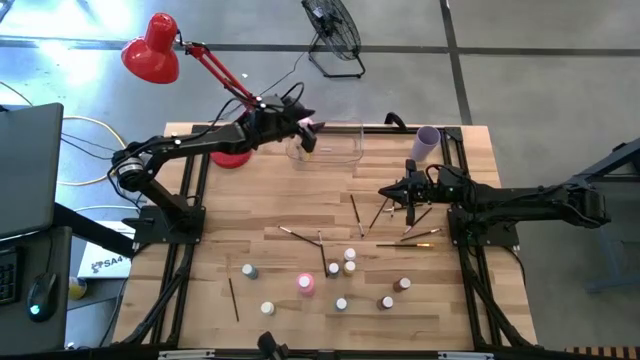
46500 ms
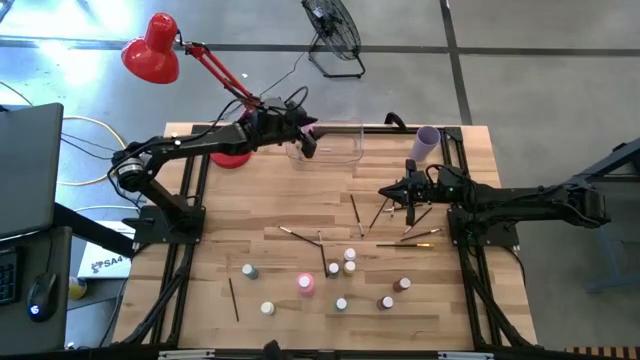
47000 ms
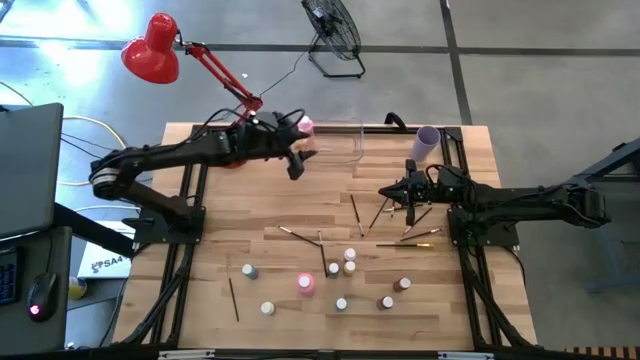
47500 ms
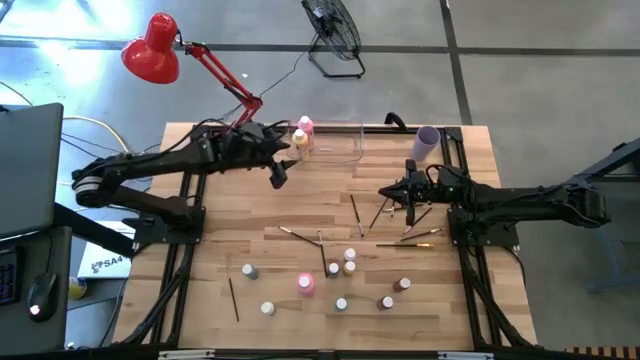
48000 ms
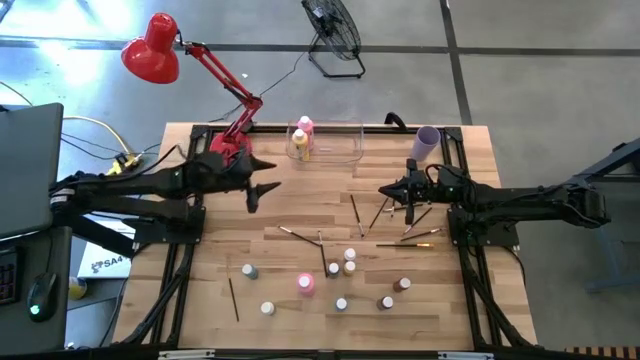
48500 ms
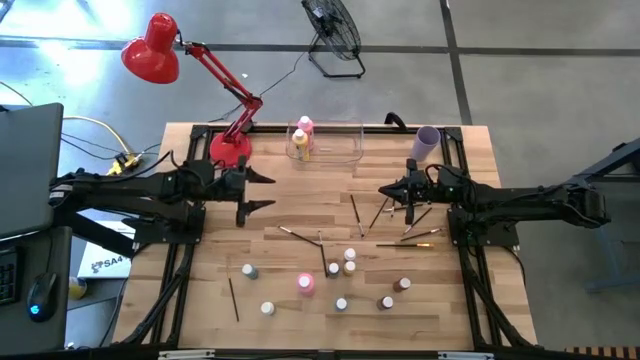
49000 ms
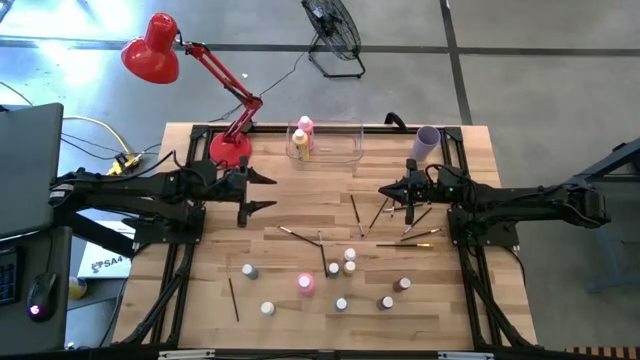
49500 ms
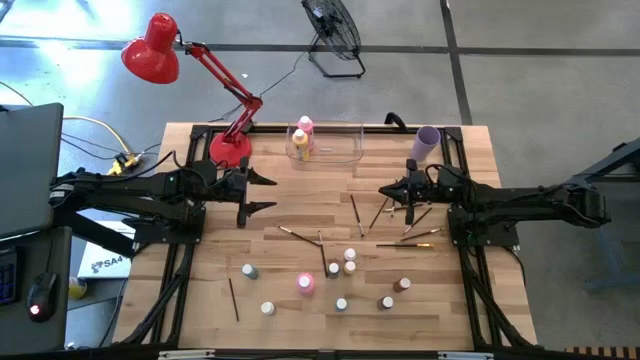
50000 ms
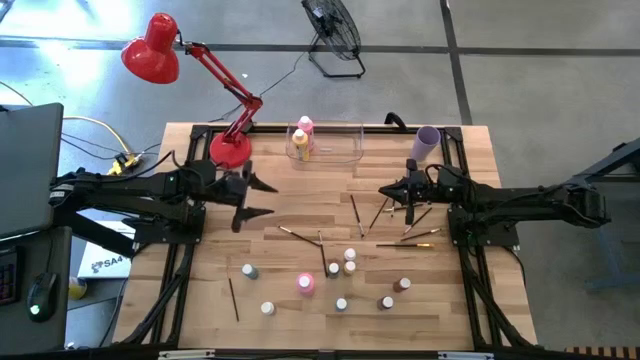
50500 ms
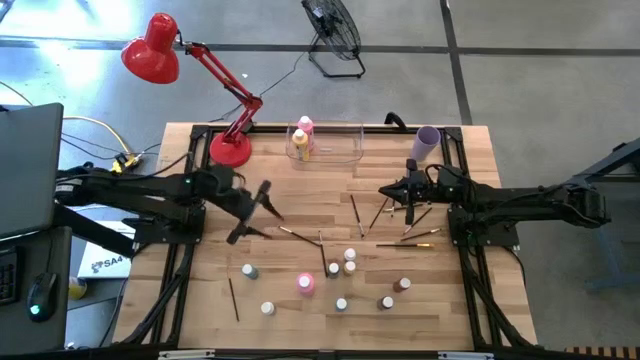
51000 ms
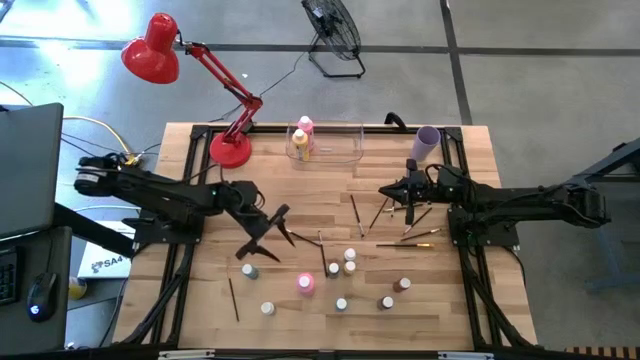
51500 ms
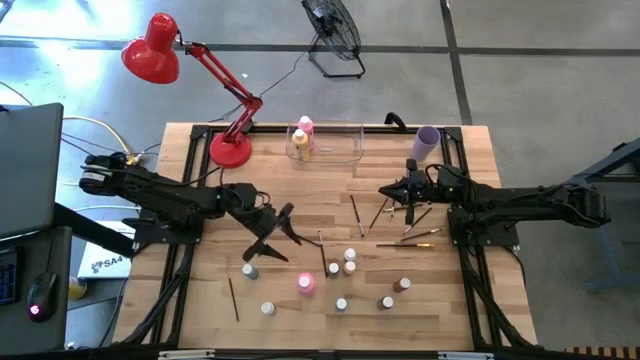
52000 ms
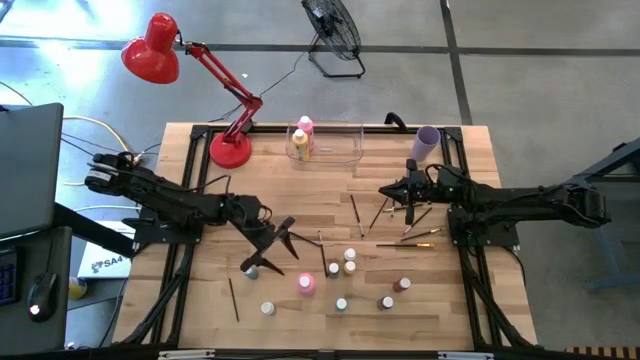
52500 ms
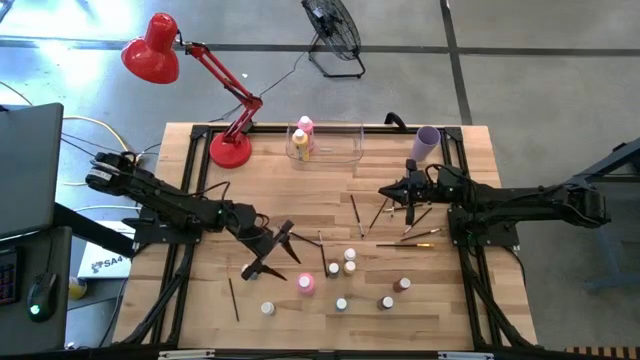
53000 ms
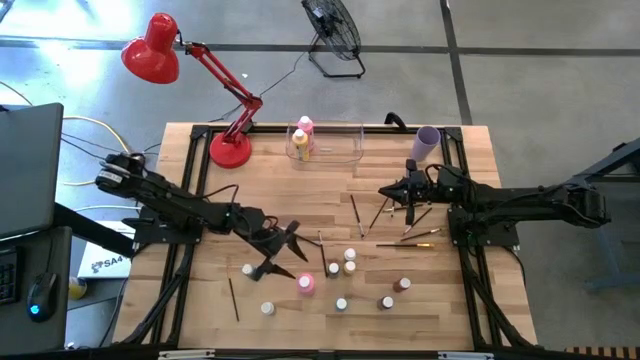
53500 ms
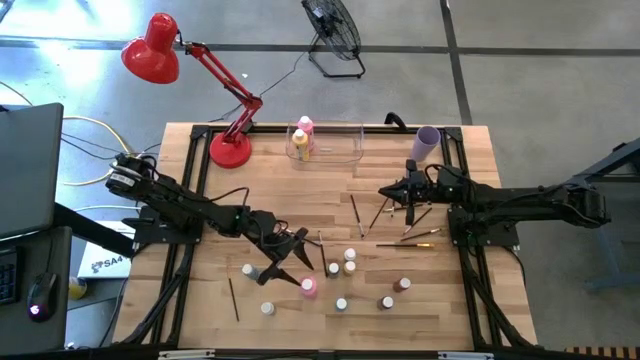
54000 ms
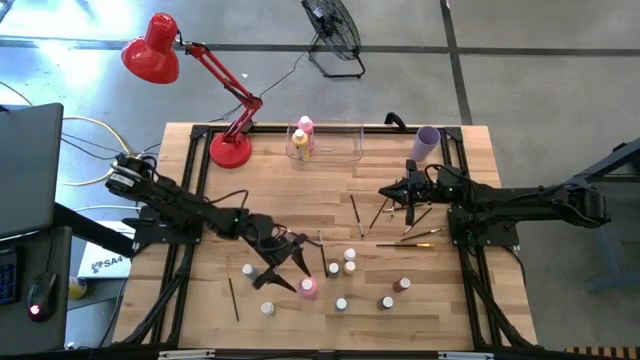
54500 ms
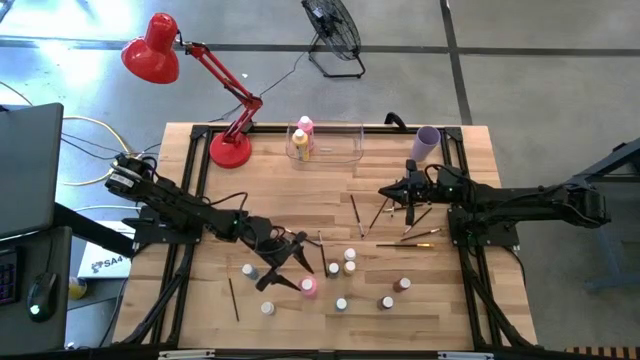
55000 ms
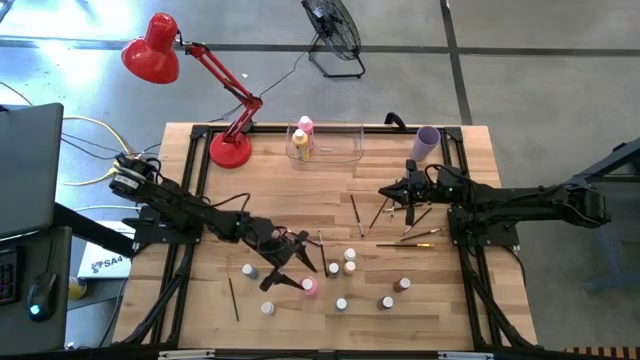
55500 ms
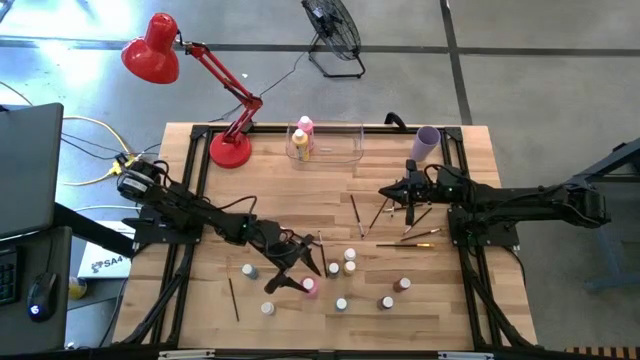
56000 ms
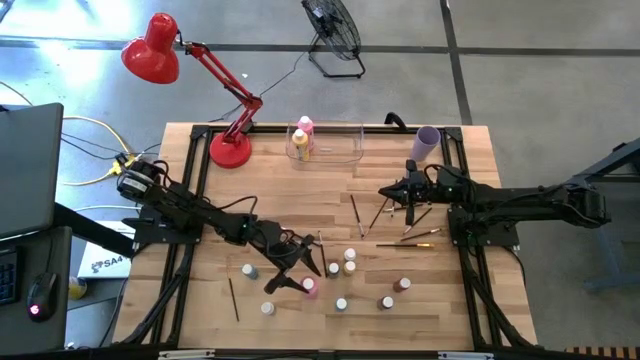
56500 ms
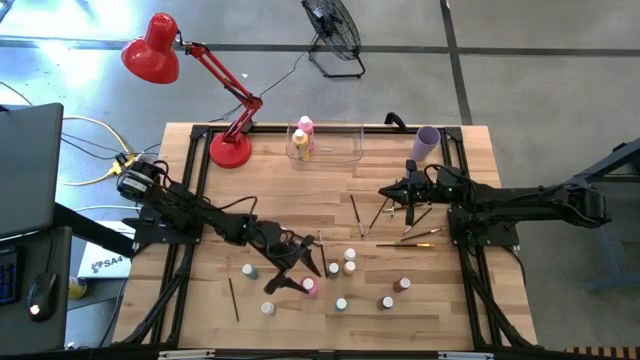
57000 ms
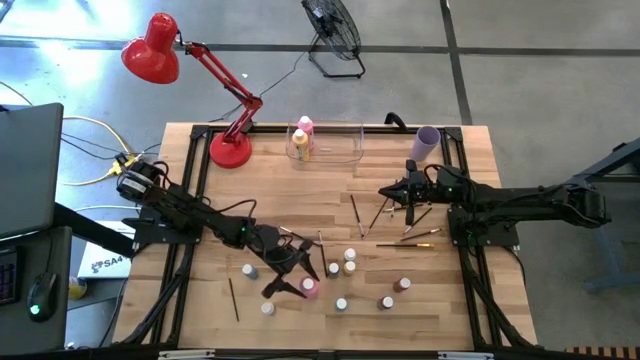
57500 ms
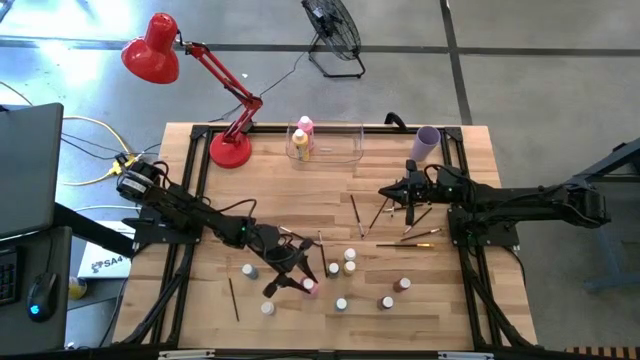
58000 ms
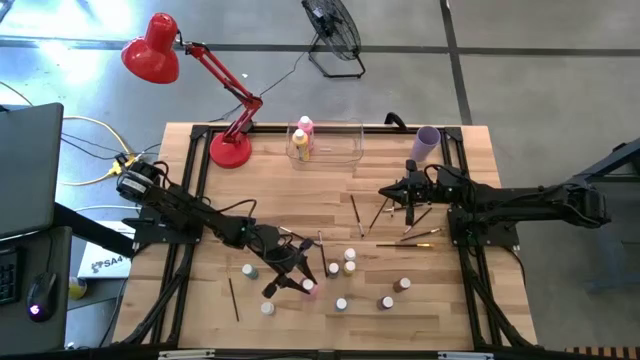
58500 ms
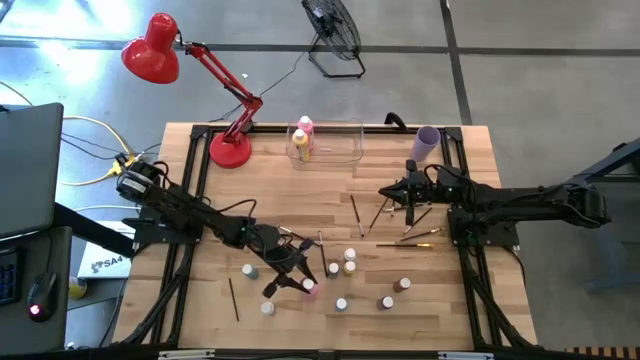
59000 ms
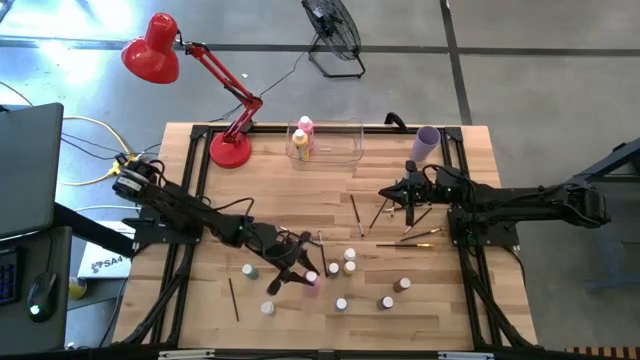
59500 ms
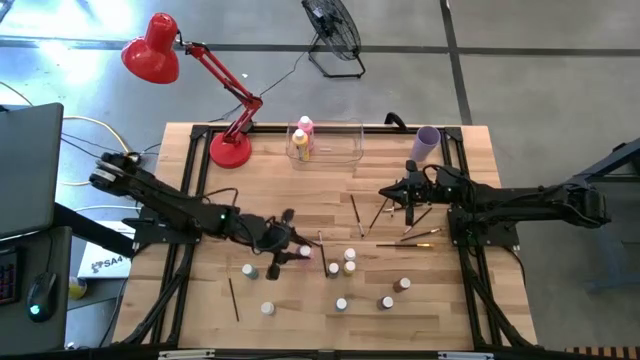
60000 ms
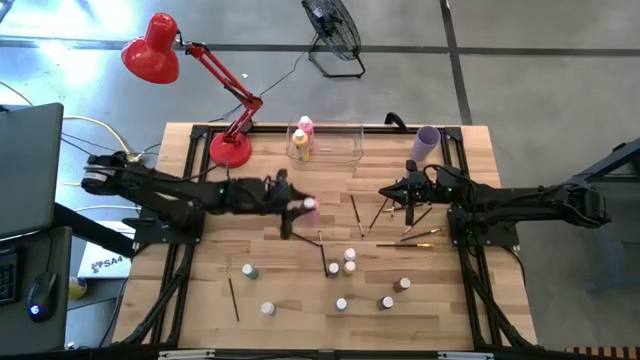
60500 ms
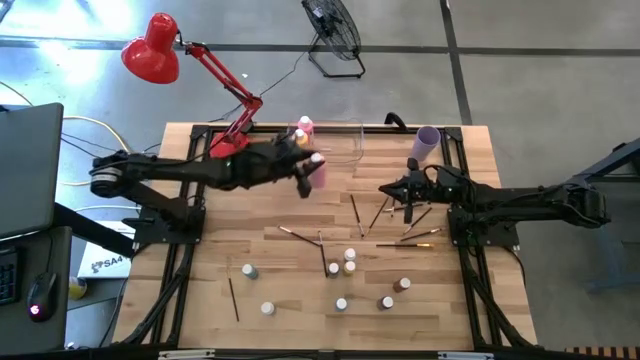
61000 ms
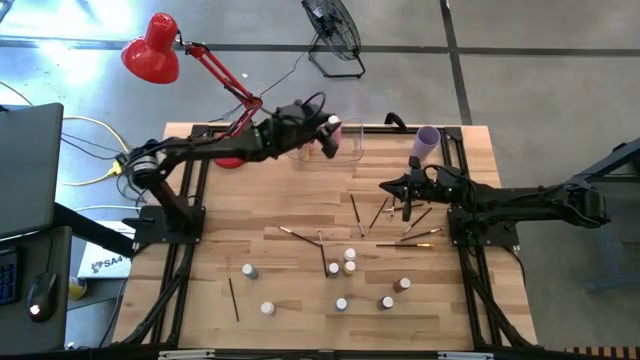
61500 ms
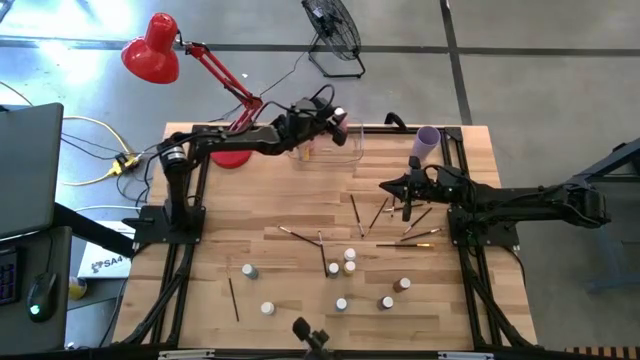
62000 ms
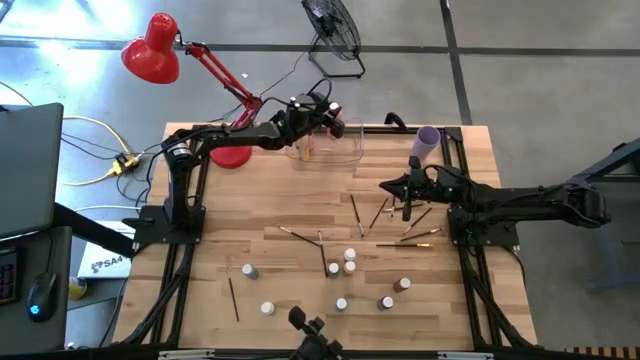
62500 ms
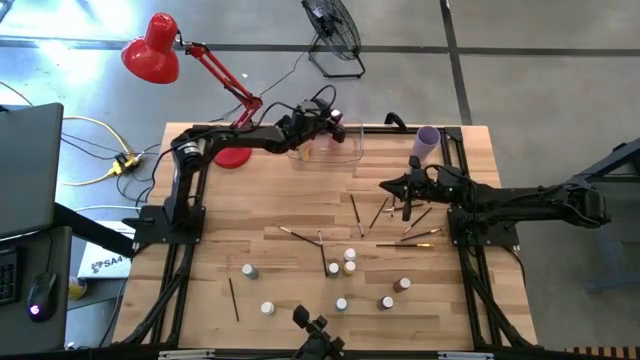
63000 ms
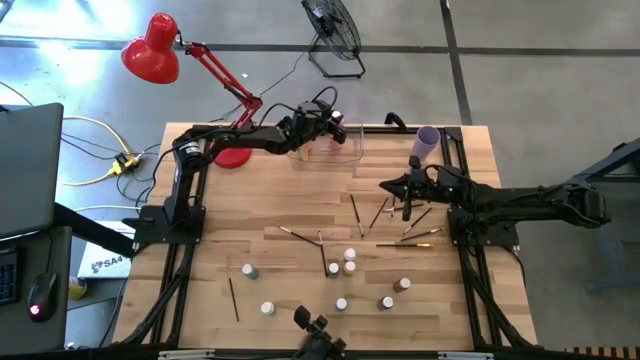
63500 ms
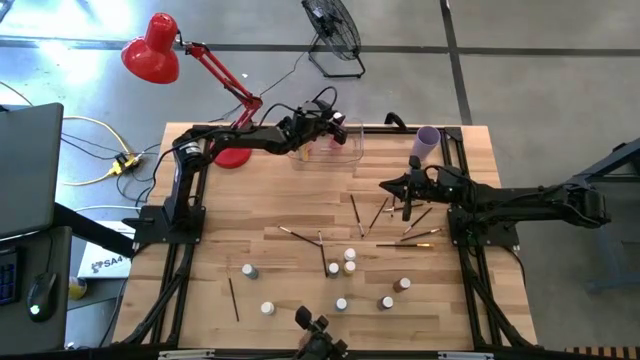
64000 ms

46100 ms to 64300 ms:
Task: Pick & Place Paint Supplies
Put the large pink paint bottle into the transparent bin

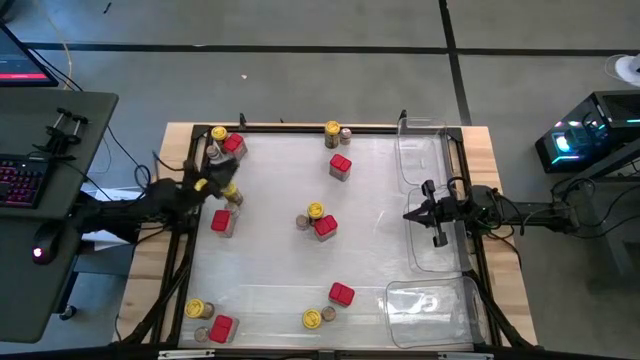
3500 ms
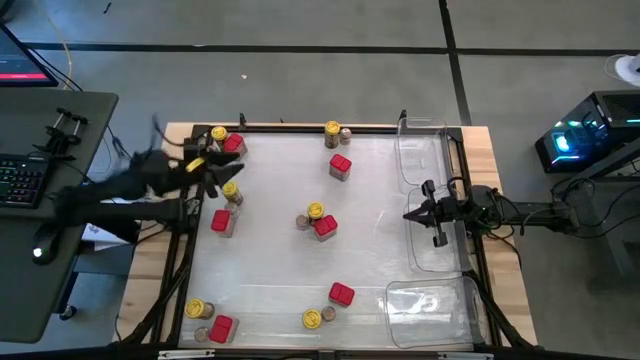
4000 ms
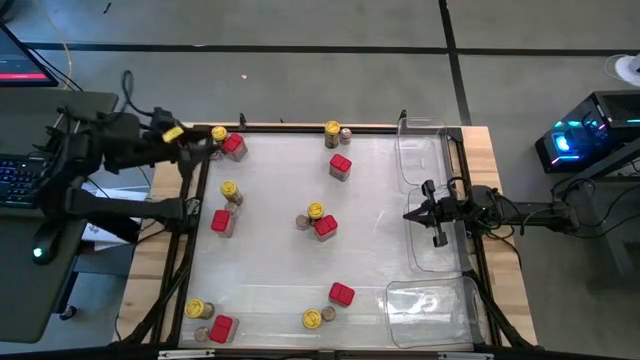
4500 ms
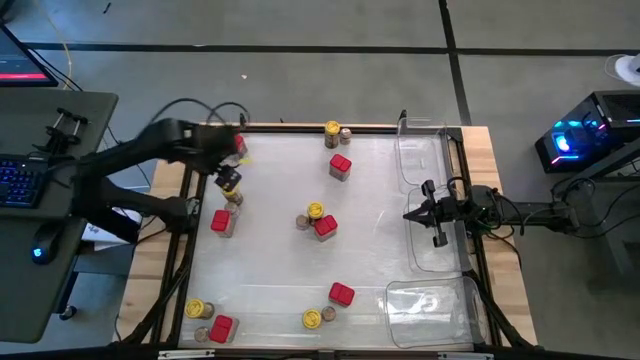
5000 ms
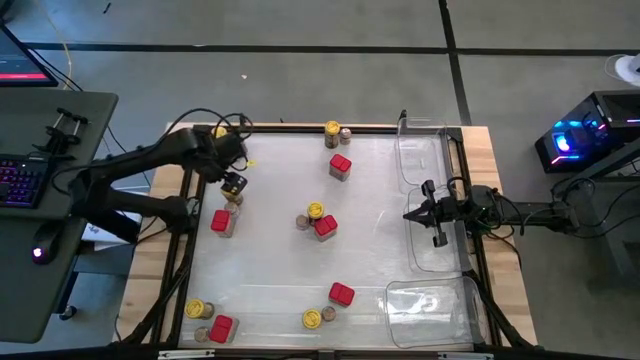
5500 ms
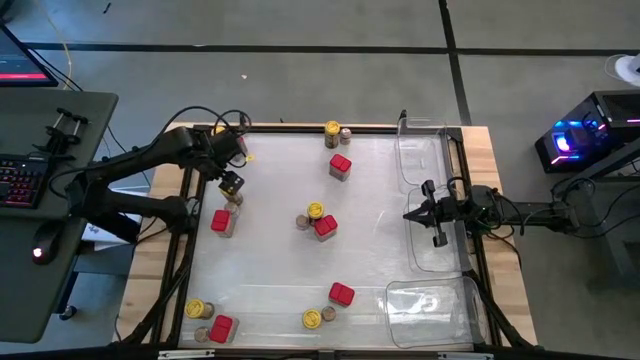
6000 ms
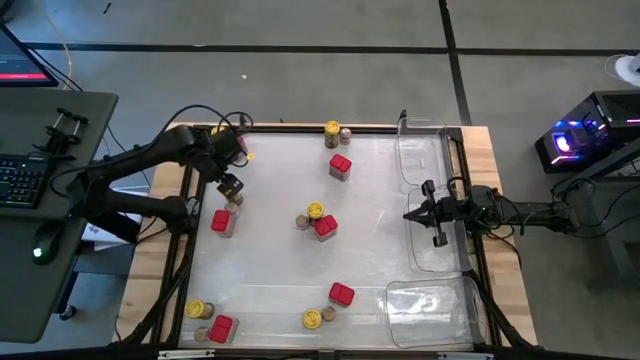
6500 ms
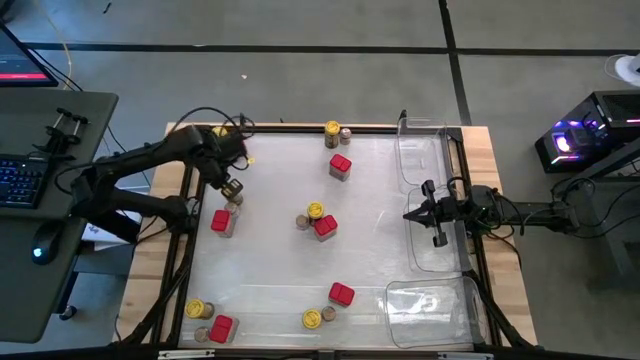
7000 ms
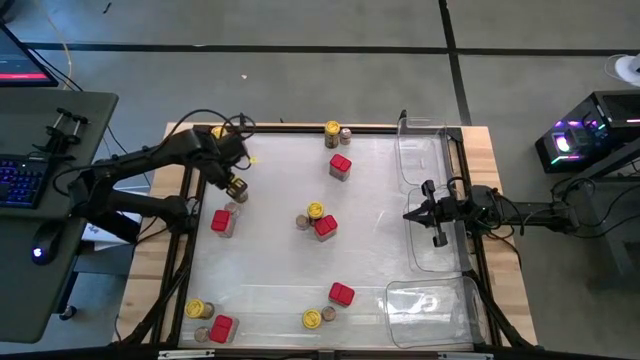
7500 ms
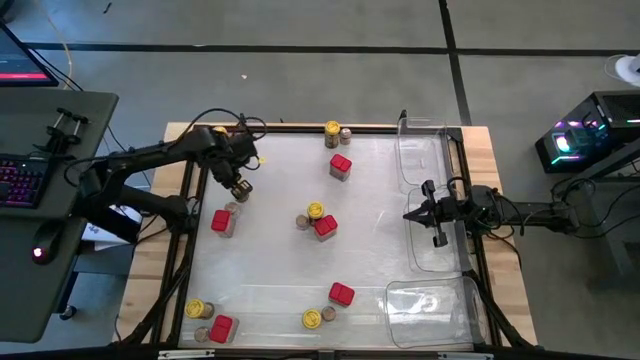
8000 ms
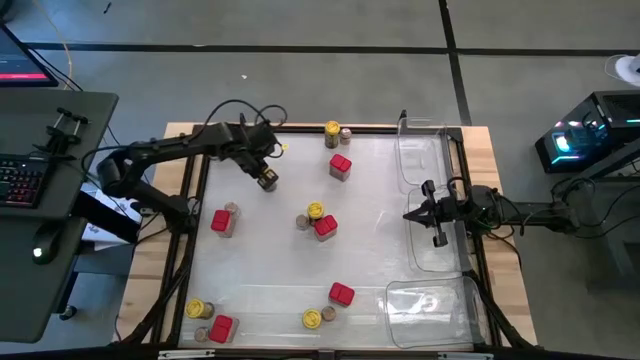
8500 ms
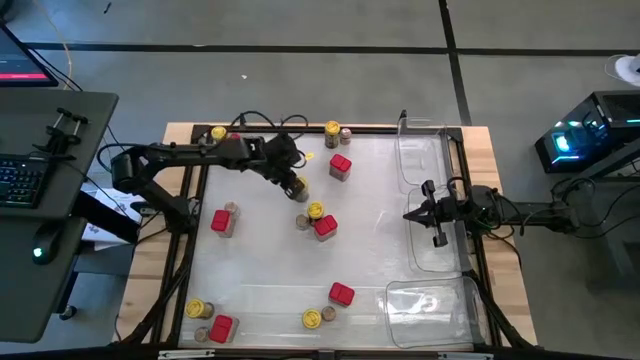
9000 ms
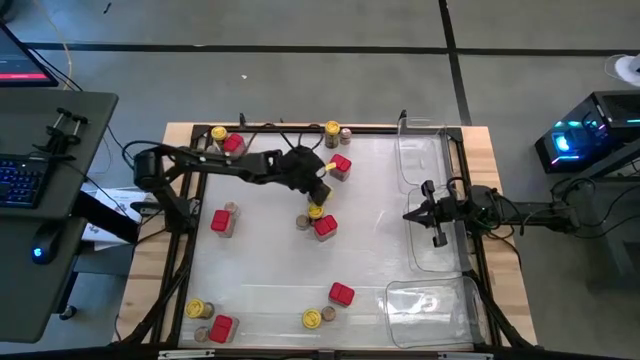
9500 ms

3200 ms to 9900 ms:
Task: Sort spices by type
Put the yellow seasoning bottle into the top transparent bin
